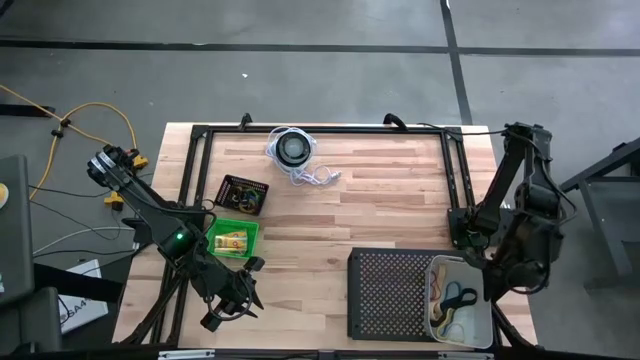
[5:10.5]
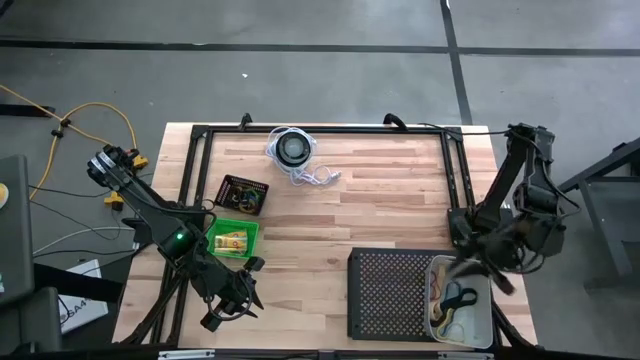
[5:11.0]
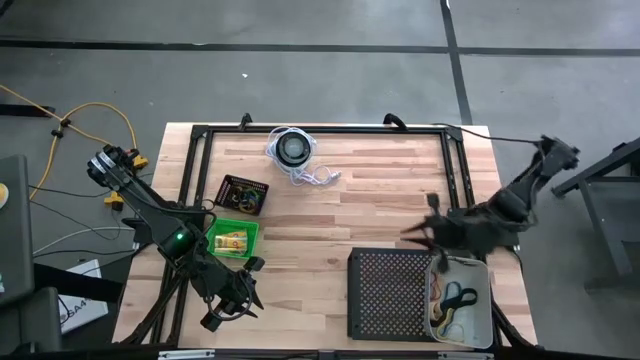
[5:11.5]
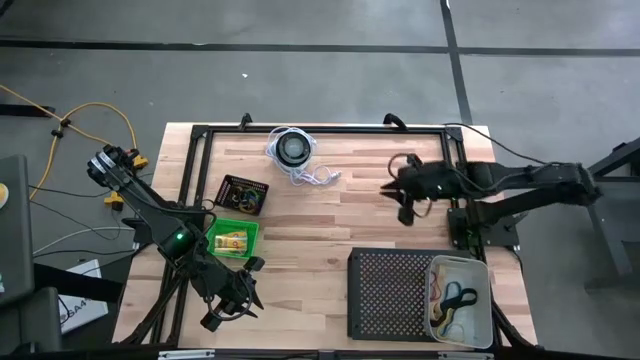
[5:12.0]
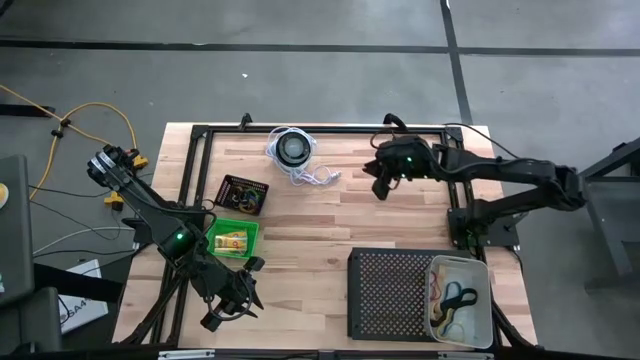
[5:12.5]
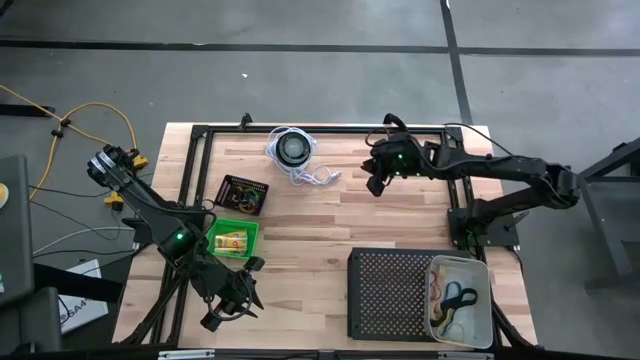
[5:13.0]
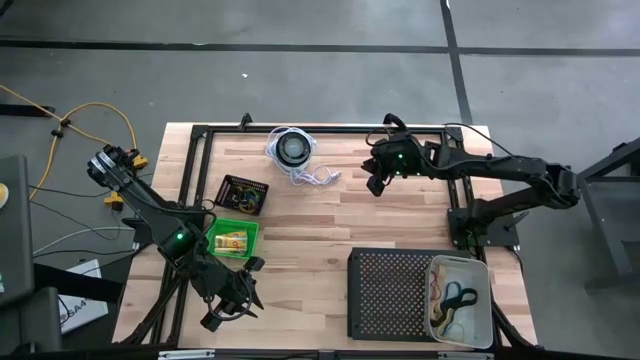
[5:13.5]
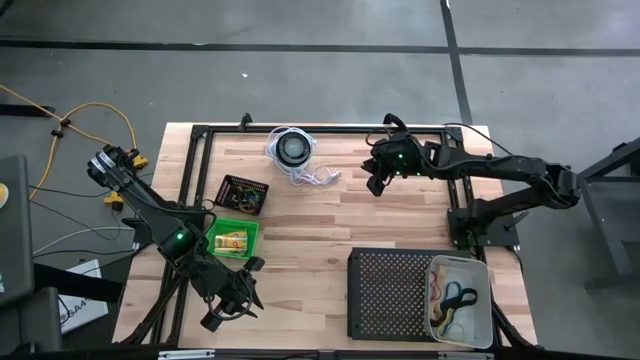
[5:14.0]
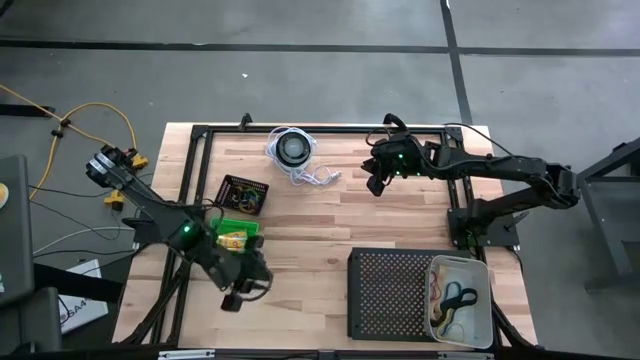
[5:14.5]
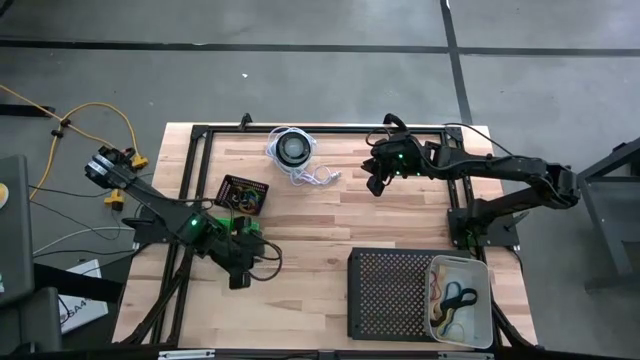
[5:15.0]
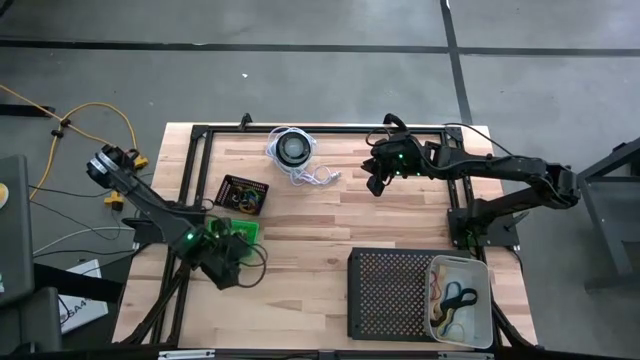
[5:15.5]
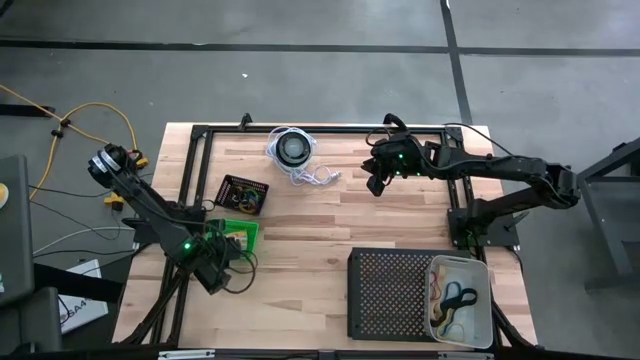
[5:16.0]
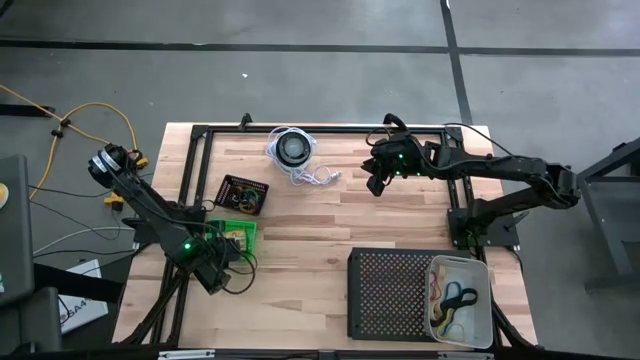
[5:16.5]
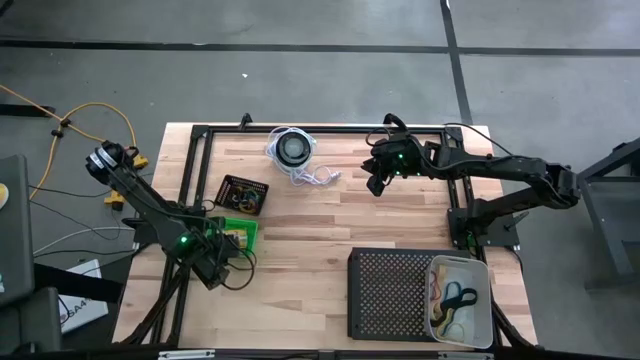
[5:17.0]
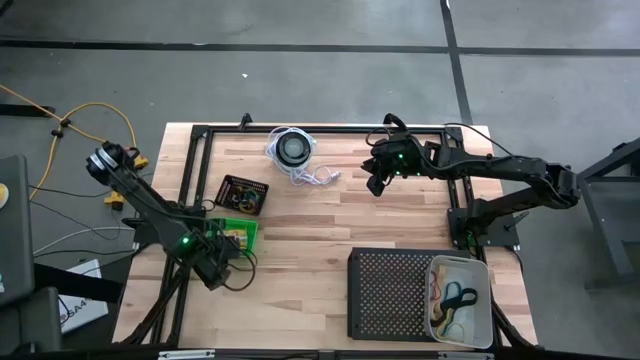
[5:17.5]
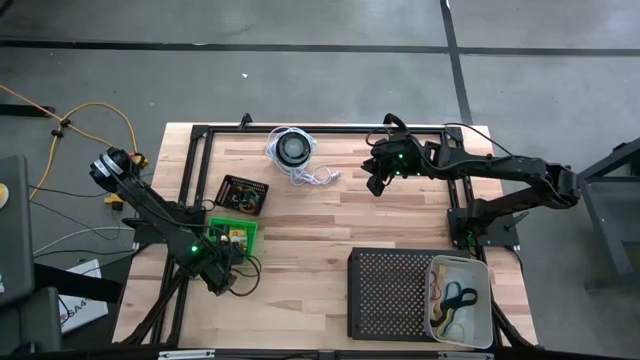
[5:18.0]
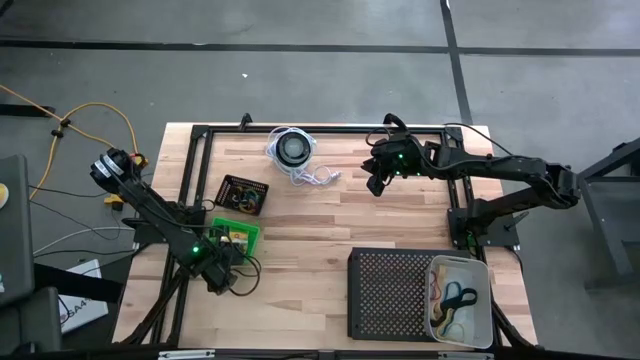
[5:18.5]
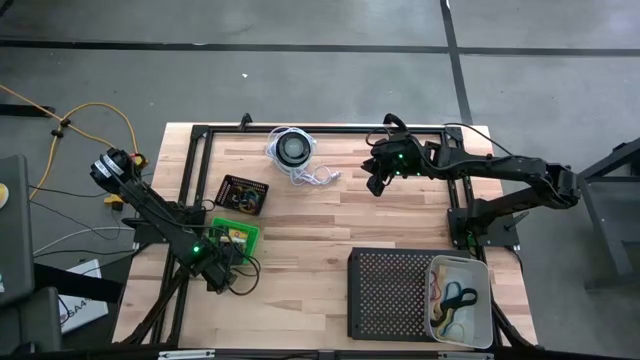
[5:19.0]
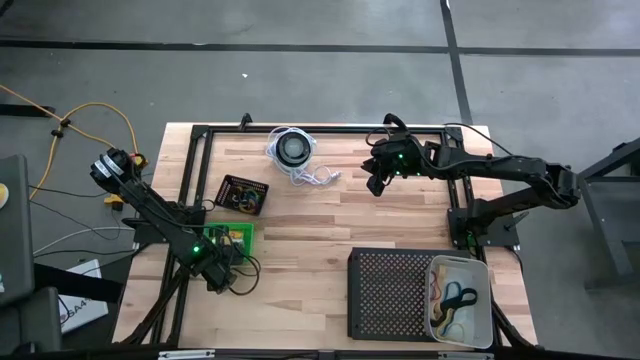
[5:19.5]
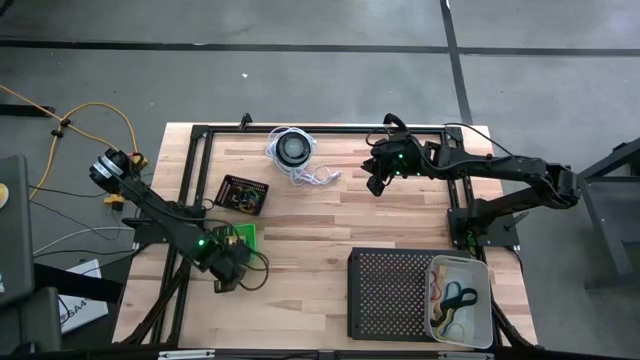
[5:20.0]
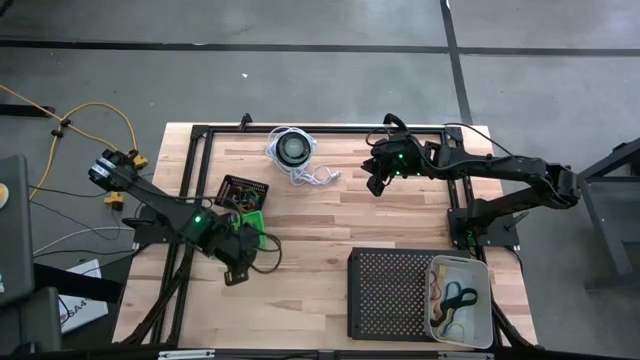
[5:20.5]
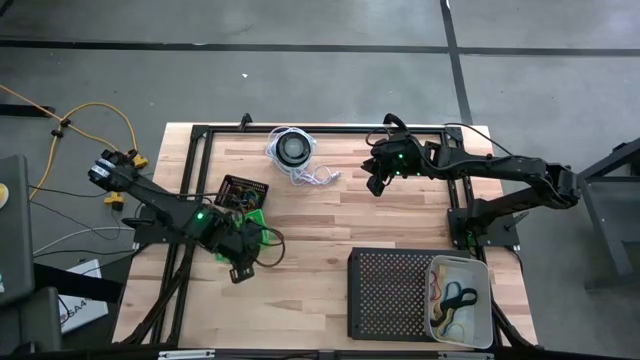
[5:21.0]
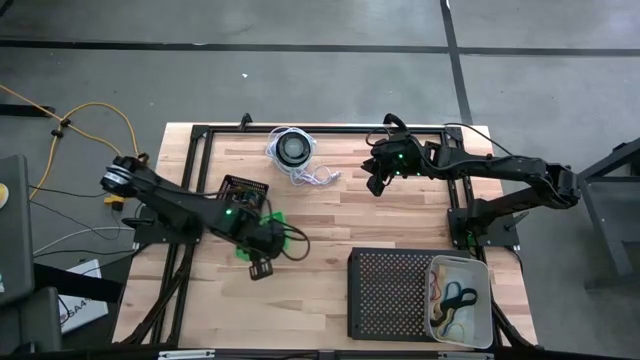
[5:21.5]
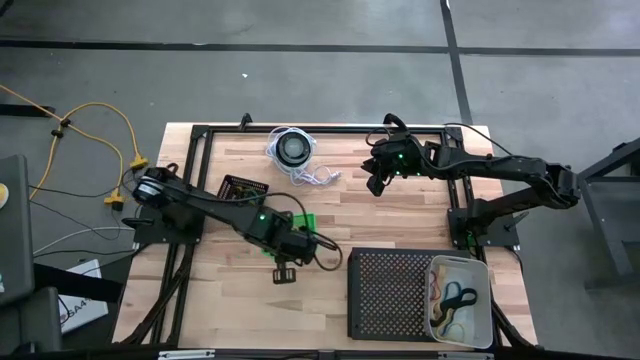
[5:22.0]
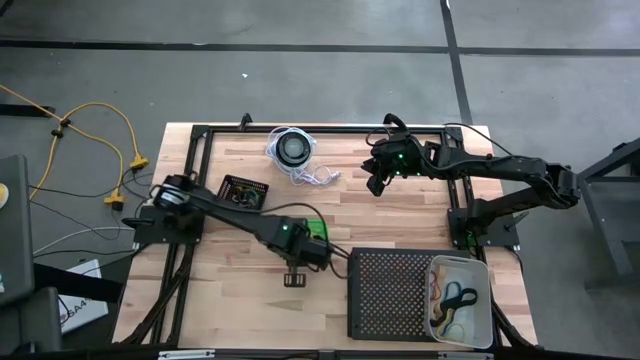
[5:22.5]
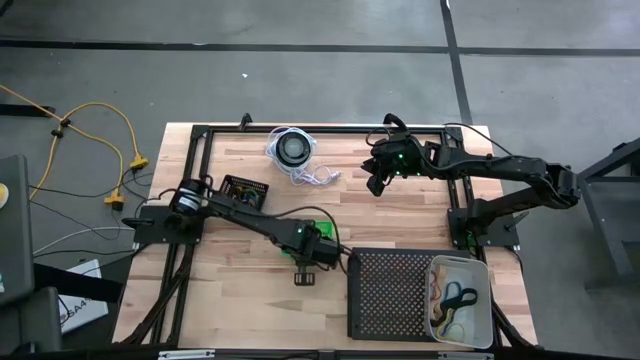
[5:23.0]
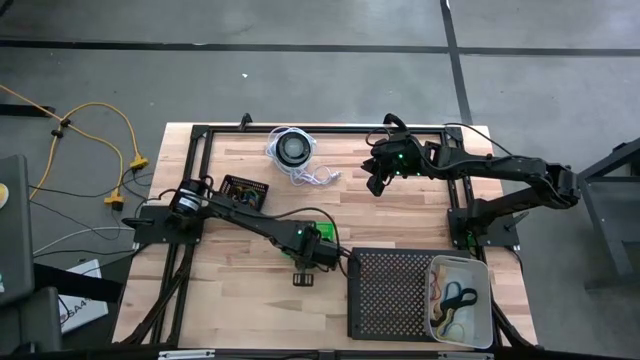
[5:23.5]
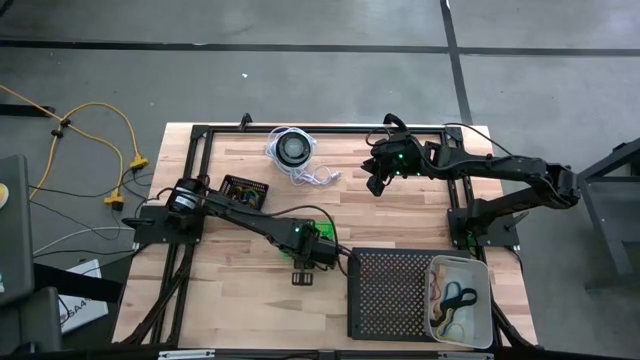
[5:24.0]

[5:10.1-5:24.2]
Task: Pick & Place Office Desk Supplies
Move the green bin to the center of the table

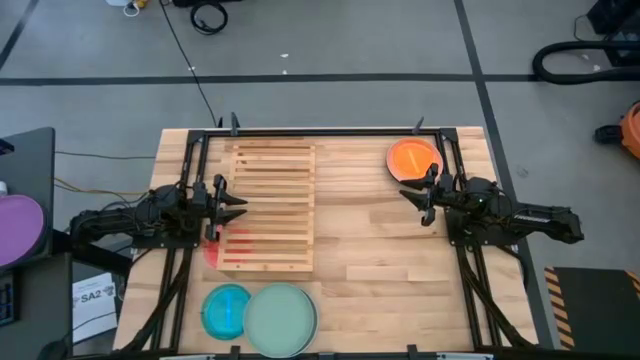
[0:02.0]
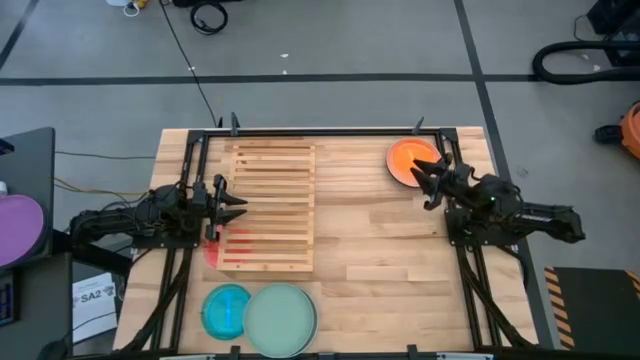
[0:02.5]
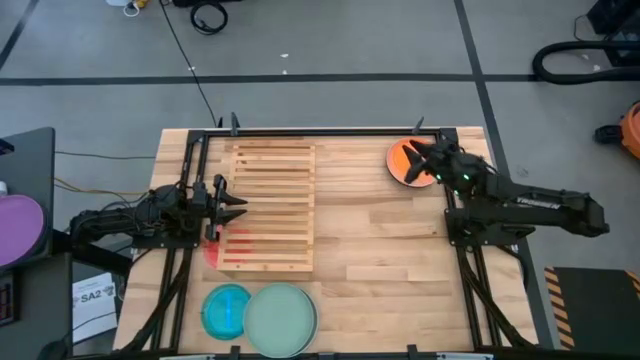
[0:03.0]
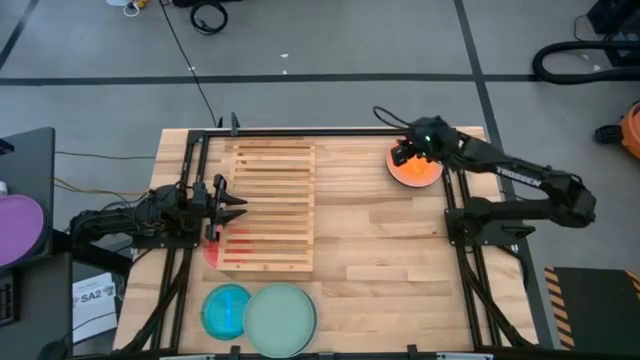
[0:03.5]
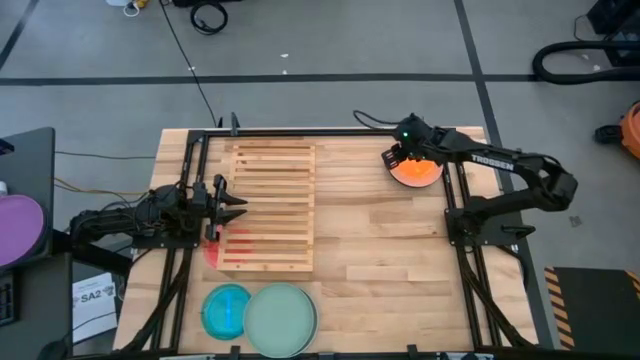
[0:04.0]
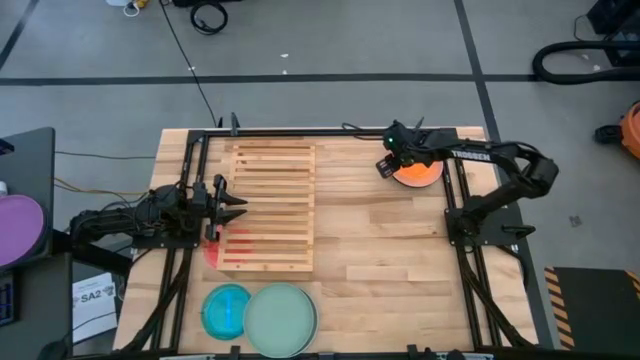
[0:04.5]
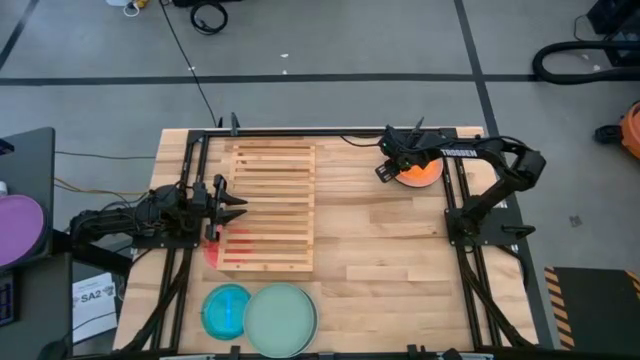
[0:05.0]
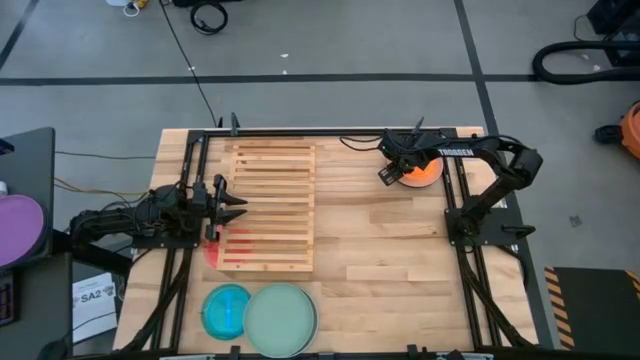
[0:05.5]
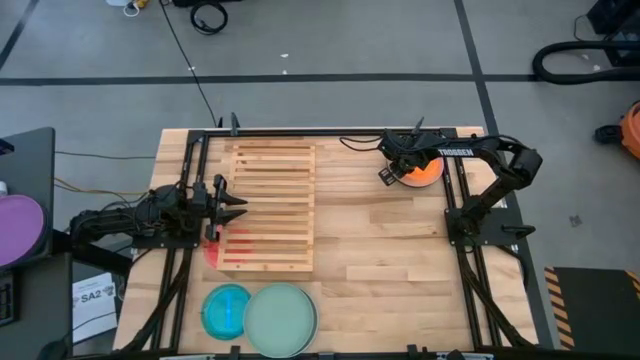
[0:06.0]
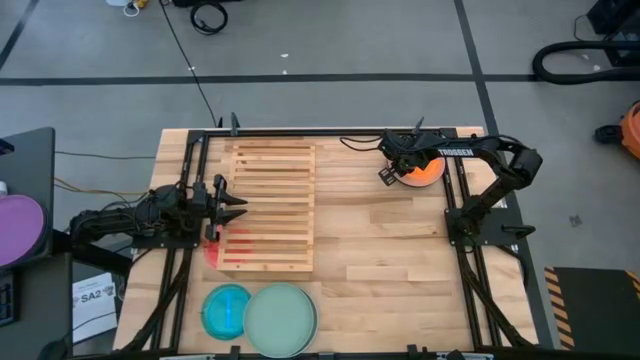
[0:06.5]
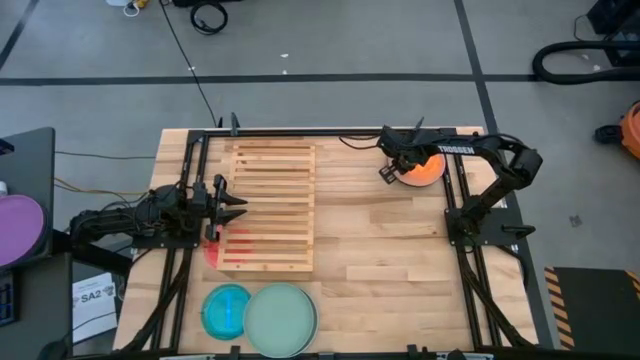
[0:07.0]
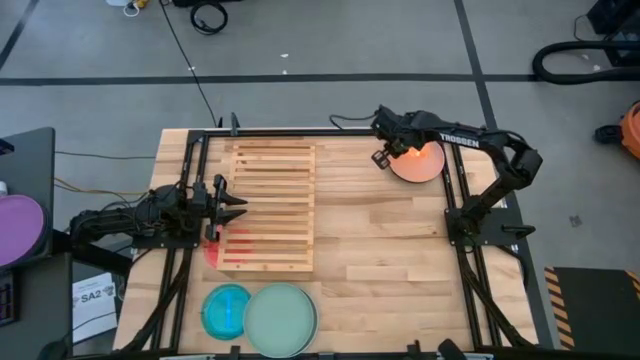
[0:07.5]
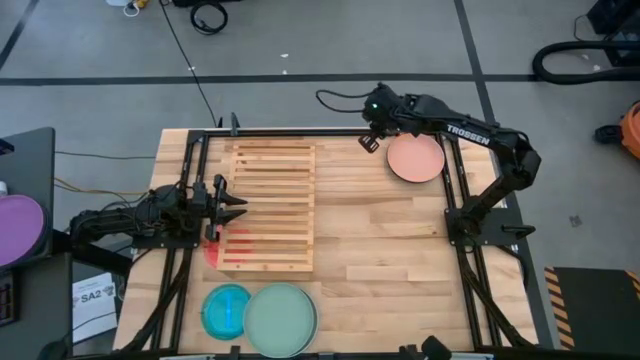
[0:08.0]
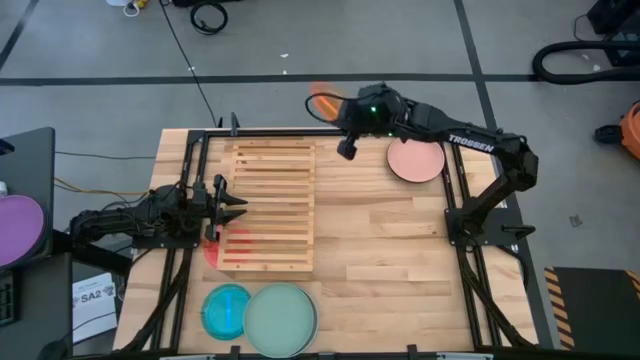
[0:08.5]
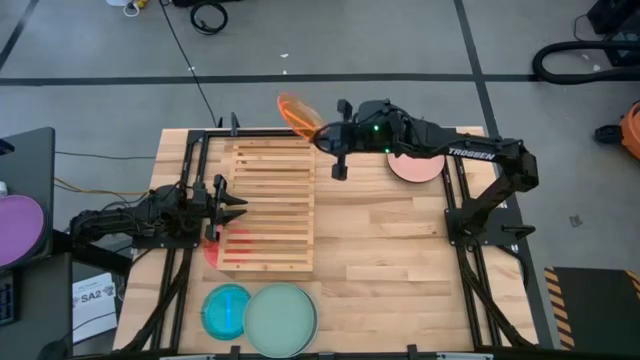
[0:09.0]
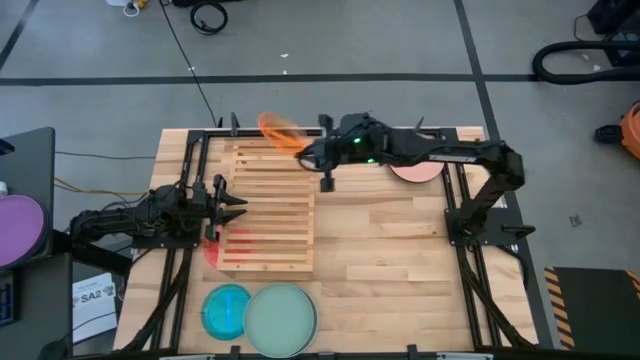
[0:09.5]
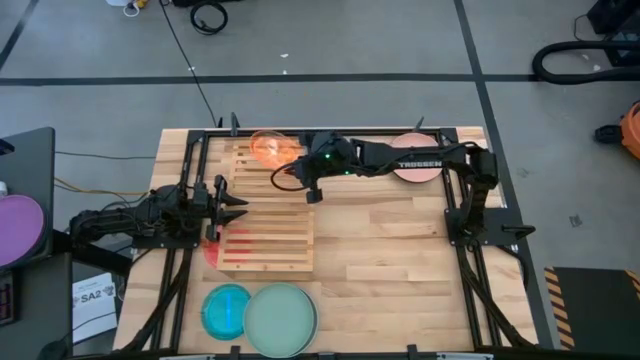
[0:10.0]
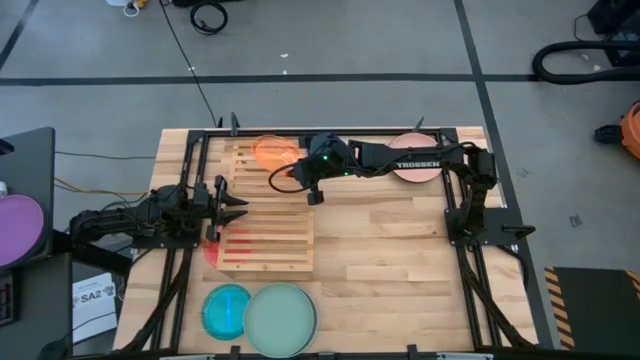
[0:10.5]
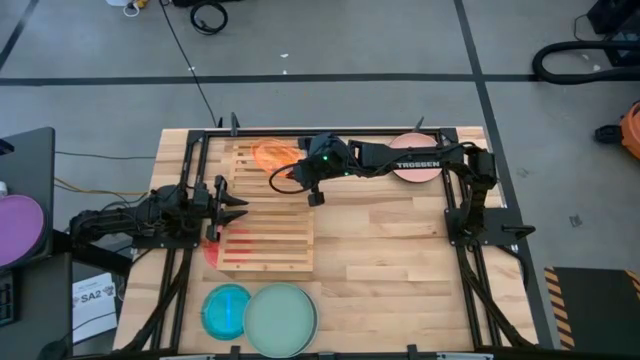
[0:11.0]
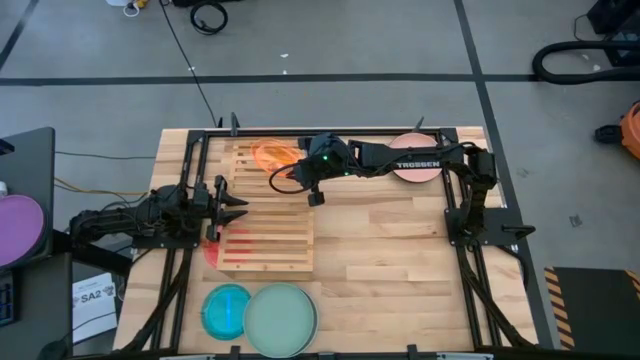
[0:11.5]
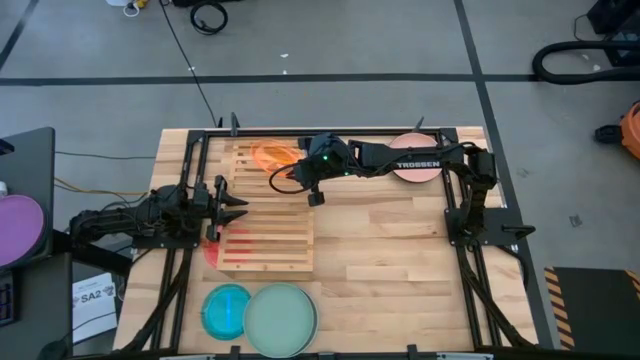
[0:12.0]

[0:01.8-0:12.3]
Task: Place and stack plates onto a shelf
Put the orange transparent plate on the shelf
